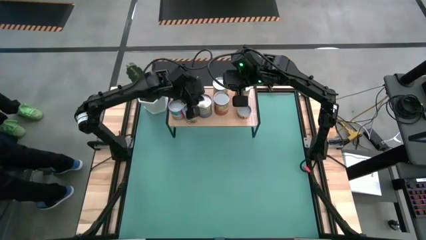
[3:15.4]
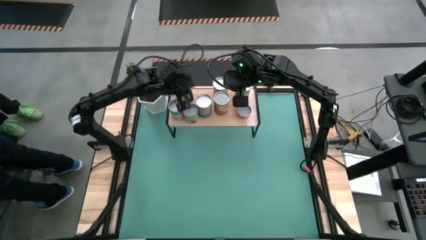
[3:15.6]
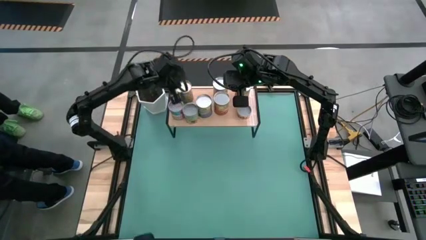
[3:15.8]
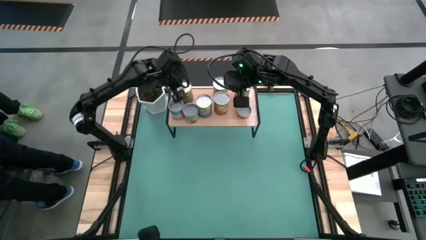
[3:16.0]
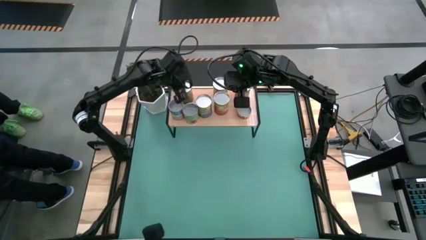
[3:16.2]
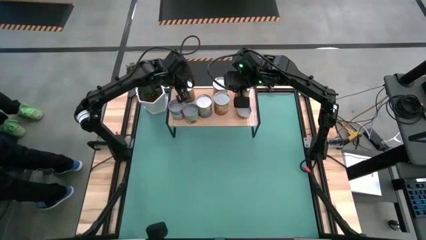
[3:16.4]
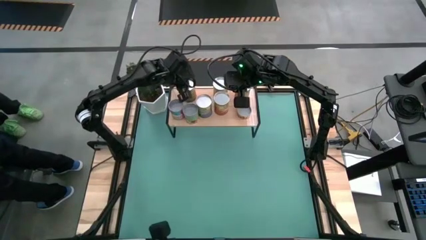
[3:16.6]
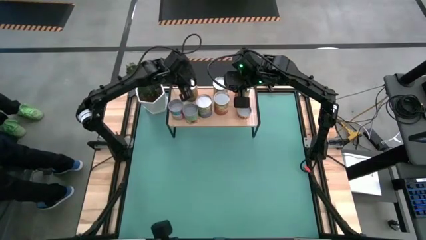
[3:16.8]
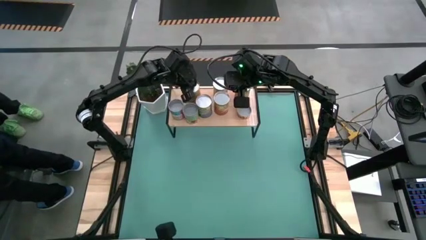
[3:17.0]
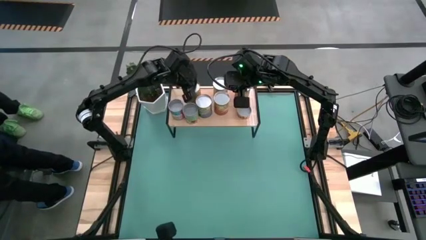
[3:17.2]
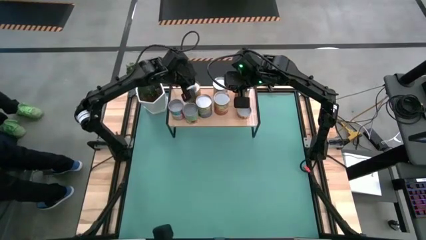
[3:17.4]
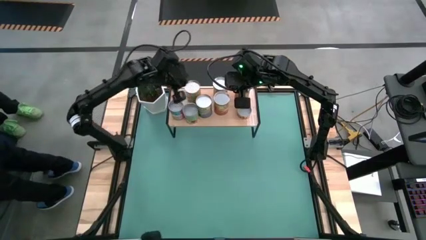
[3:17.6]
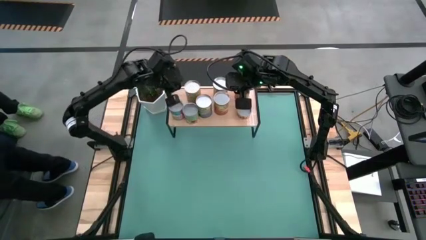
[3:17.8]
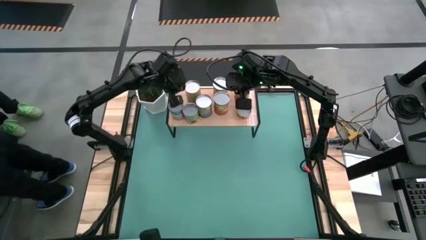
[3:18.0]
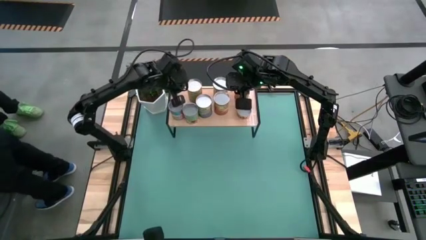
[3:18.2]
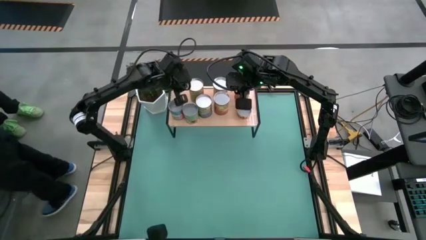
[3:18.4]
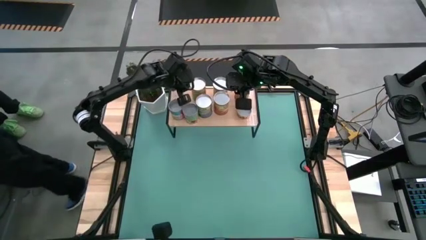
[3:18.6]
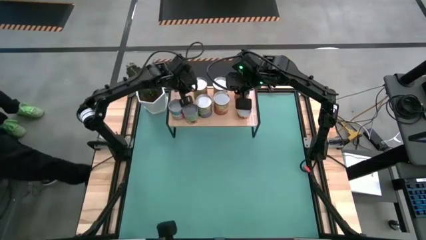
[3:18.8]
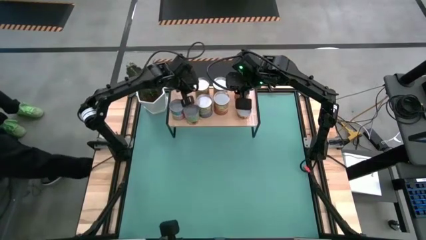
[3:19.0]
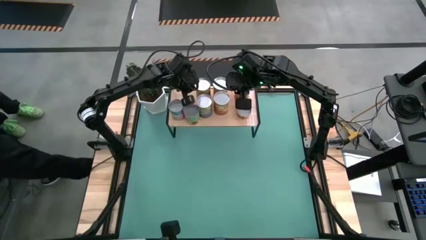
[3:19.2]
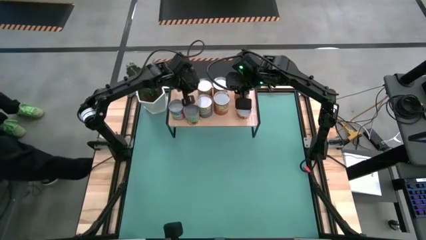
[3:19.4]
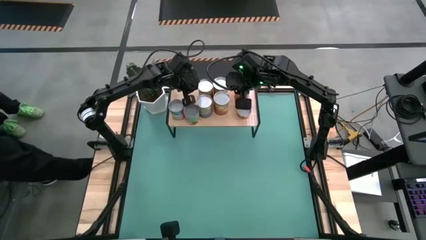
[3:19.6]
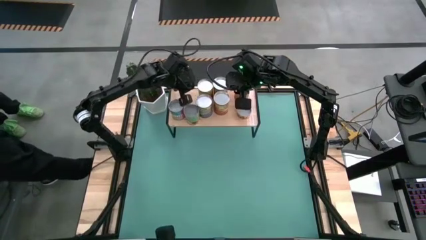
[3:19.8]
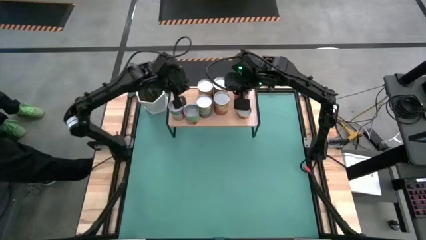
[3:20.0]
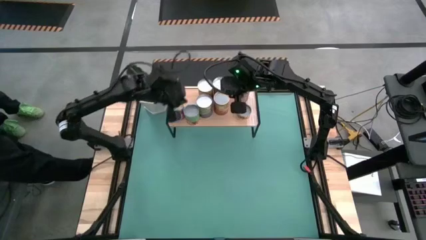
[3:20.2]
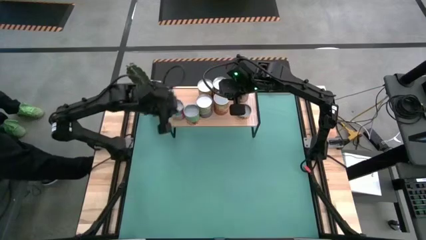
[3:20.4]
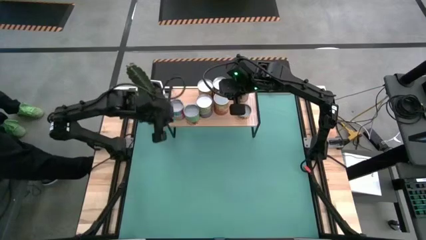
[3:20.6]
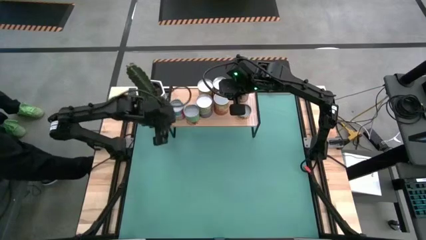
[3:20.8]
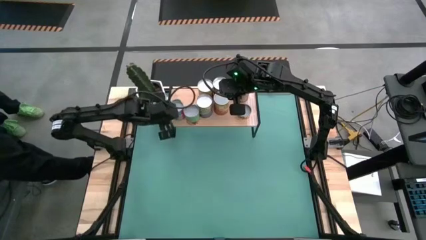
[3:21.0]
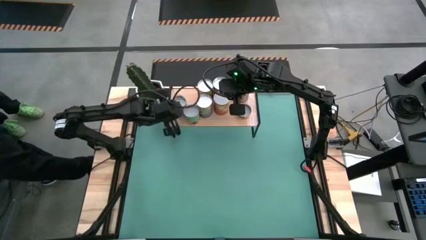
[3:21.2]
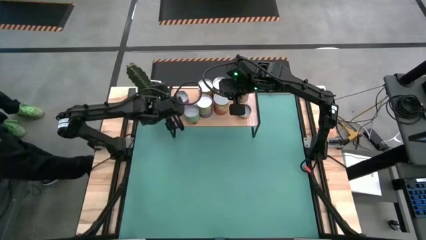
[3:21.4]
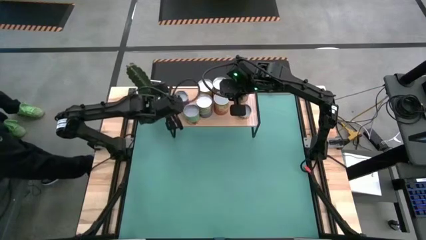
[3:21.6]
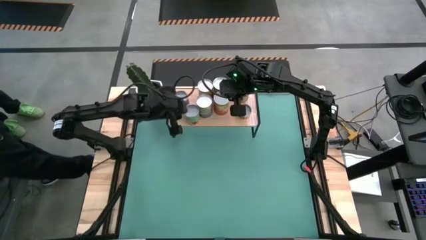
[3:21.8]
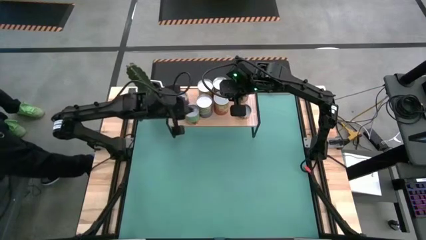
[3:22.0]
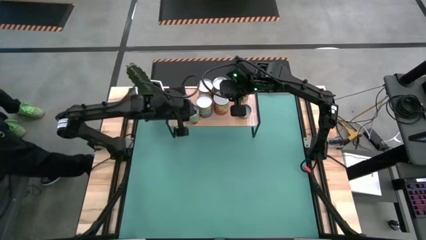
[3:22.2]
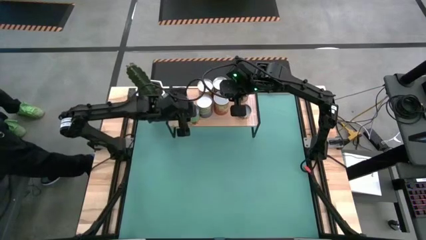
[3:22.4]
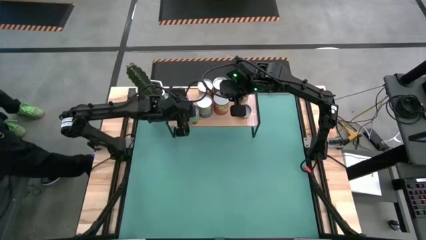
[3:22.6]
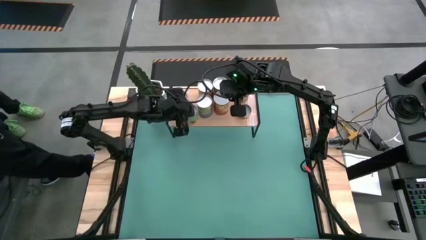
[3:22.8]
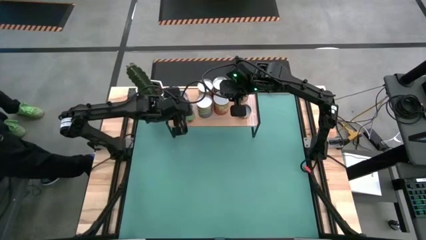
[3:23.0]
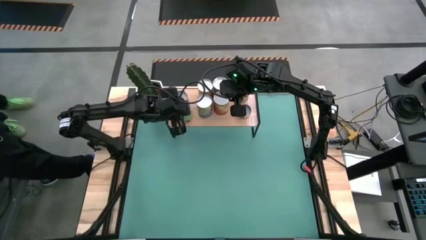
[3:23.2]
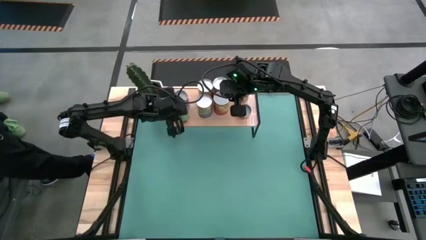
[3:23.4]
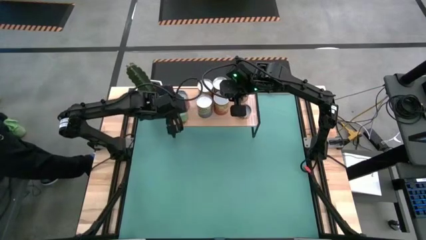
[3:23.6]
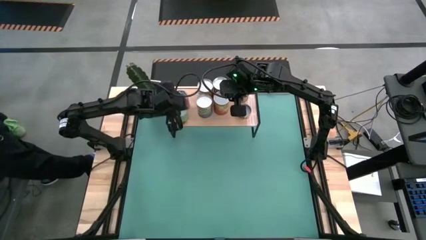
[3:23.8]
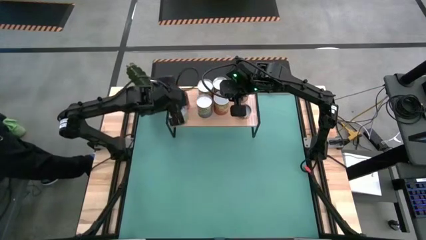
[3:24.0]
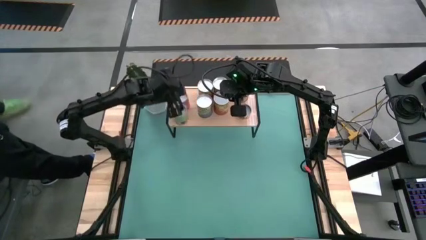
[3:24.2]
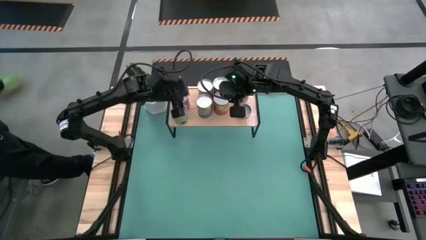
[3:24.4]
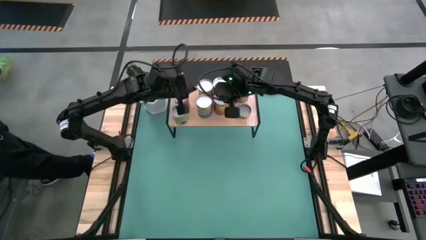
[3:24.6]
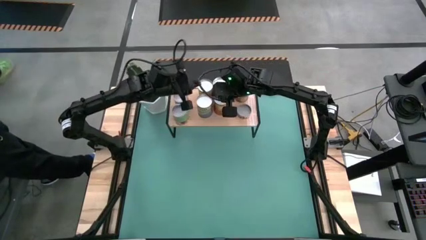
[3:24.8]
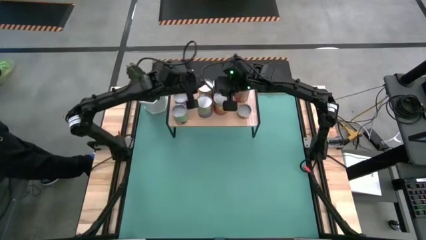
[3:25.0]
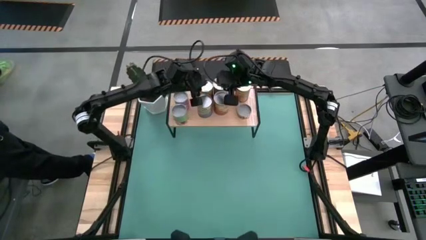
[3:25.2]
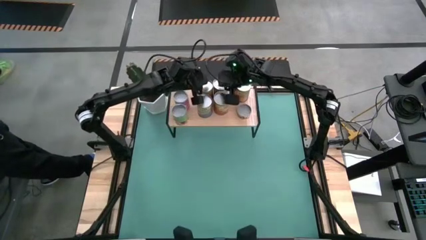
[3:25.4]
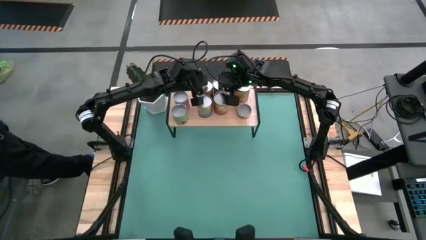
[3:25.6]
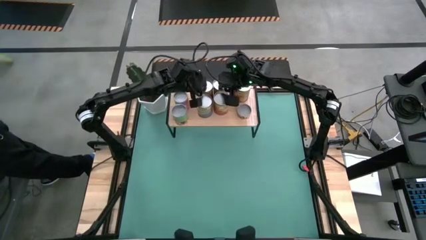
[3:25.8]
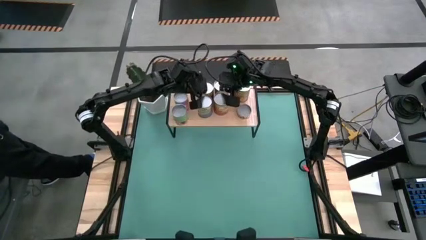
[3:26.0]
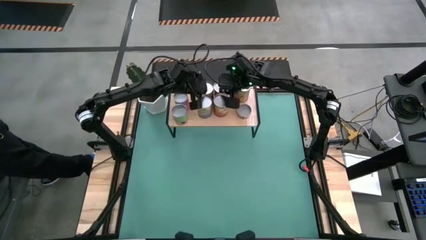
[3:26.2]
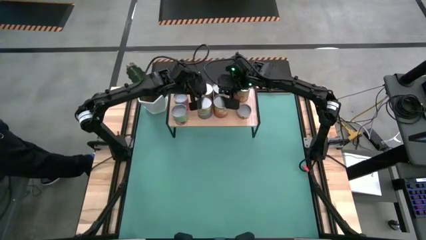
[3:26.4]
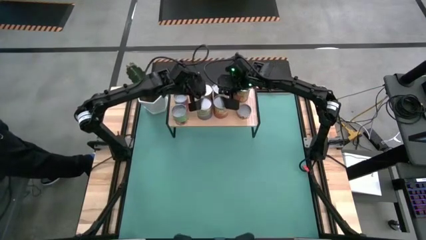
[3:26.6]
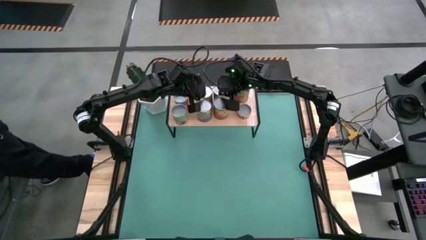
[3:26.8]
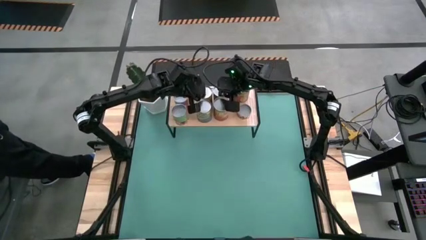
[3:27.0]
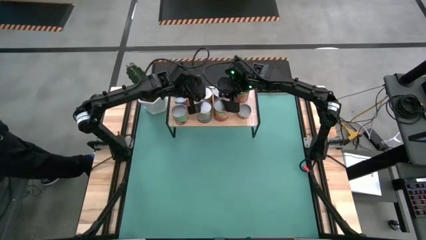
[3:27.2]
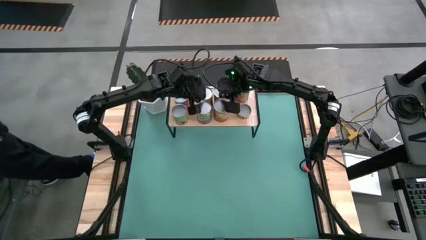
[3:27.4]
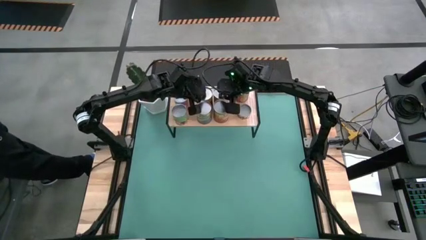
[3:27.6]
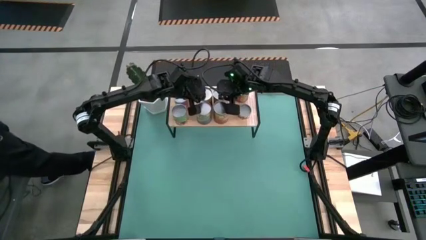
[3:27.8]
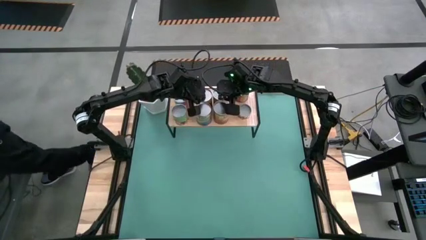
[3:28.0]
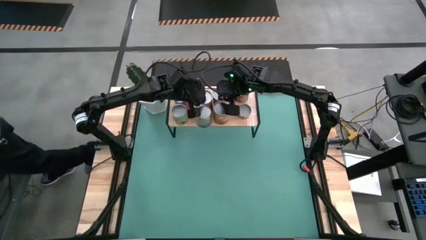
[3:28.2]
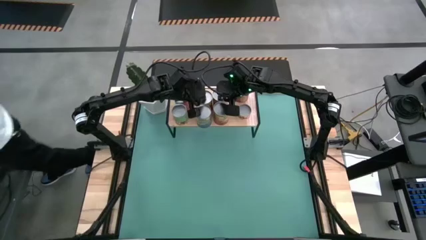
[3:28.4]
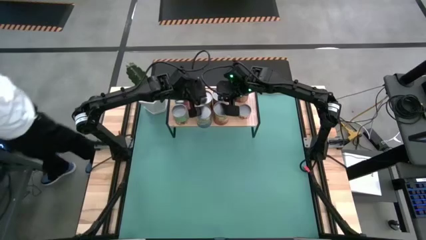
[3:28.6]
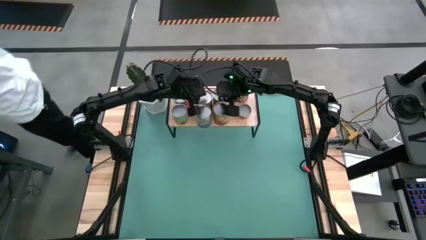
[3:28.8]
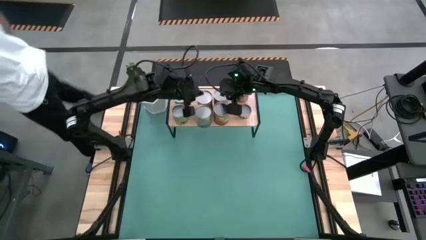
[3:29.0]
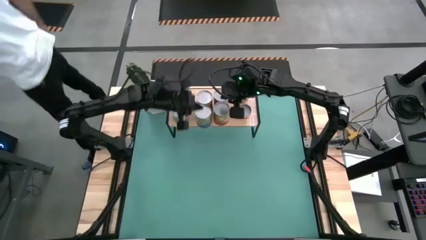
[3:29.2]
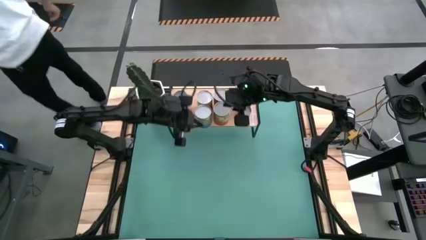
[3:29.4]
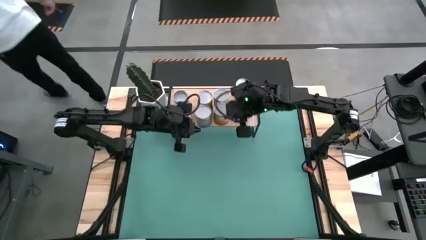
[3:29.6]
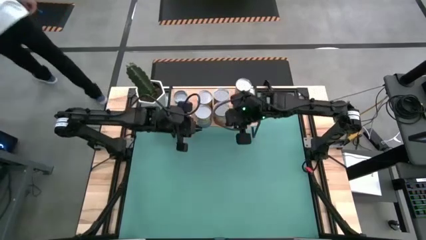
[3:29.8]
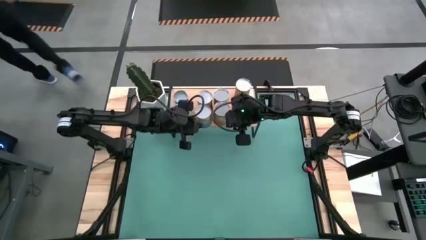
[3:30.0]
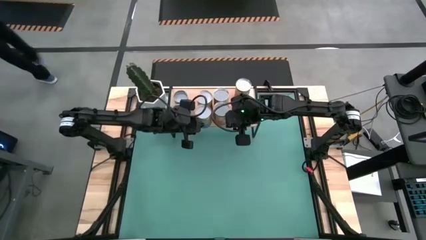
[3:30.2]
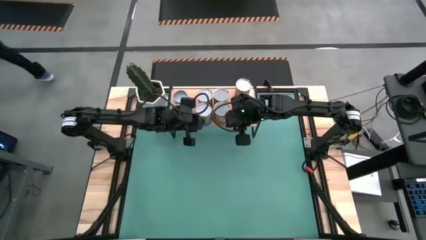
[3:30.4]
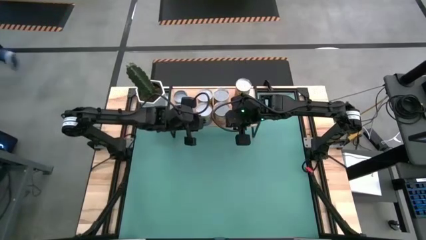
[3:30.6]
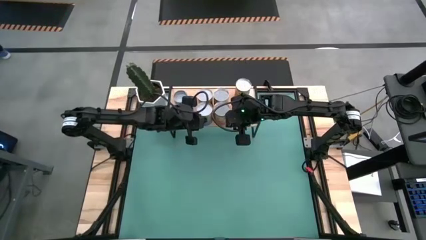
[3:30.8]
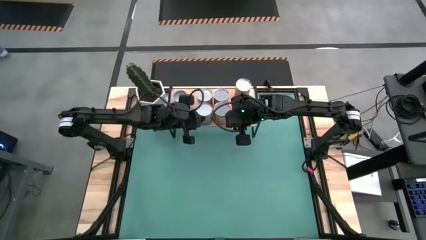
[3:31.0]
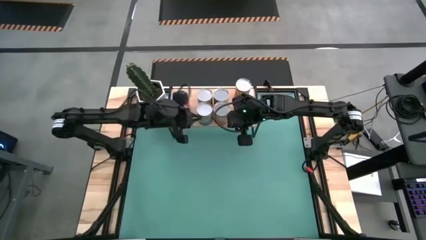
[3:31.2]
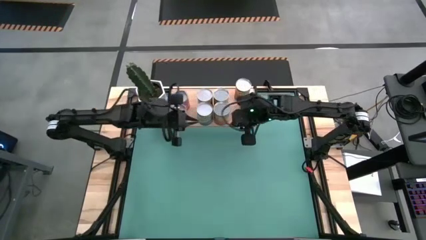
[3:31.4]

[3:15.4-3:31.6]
Task: Pick and place cans onto a shelf
Adjust the canned goods on the shelf
